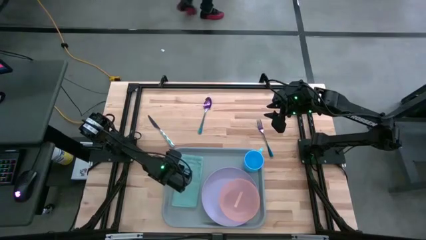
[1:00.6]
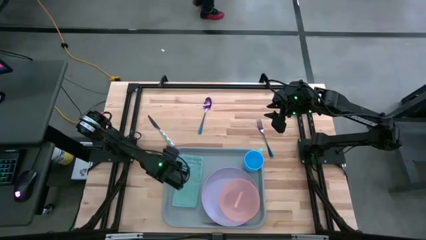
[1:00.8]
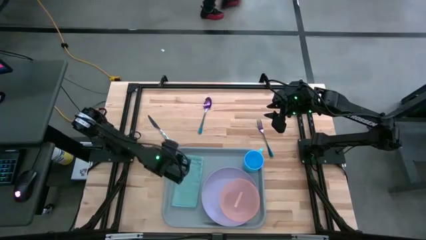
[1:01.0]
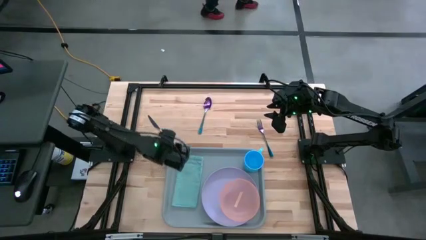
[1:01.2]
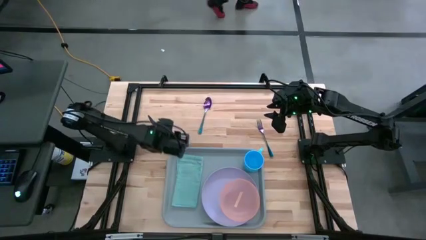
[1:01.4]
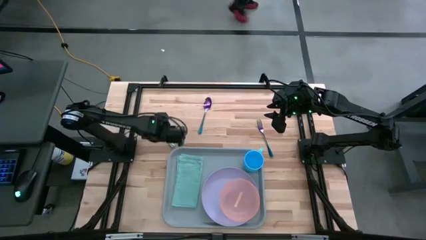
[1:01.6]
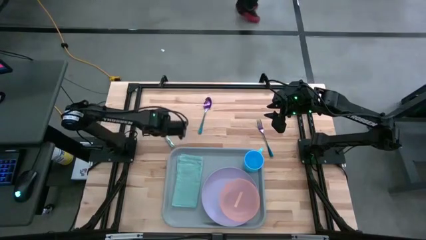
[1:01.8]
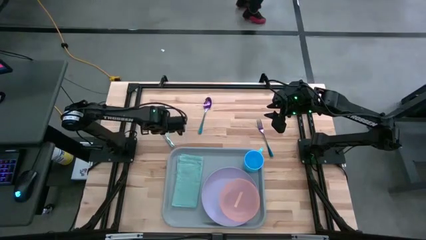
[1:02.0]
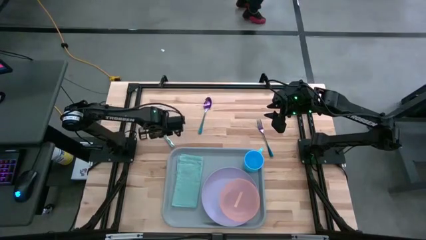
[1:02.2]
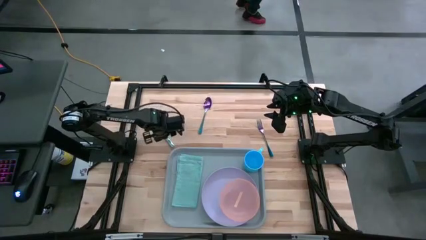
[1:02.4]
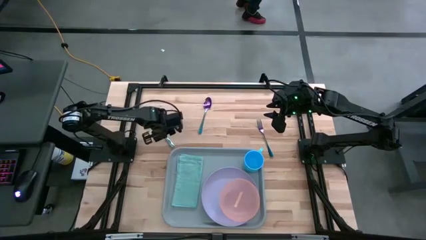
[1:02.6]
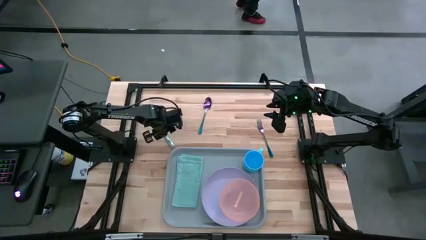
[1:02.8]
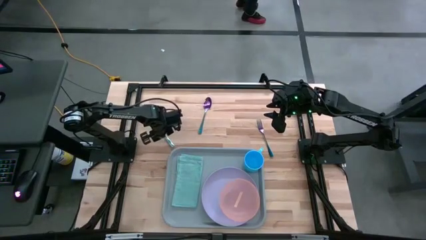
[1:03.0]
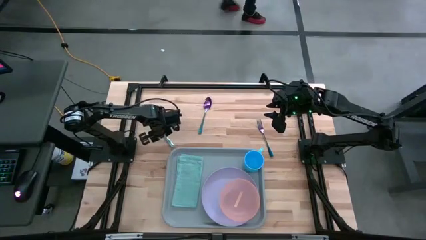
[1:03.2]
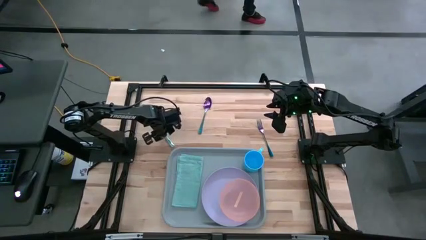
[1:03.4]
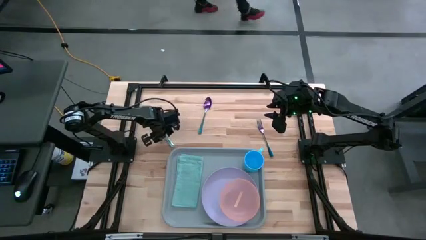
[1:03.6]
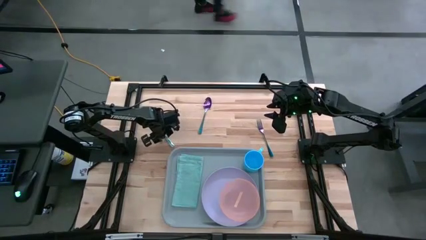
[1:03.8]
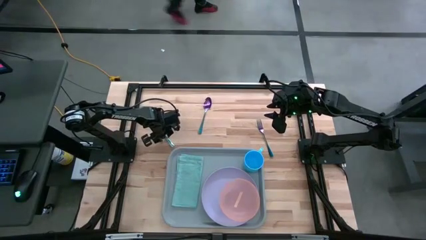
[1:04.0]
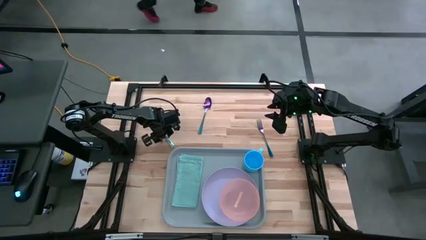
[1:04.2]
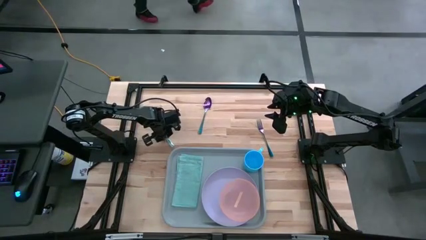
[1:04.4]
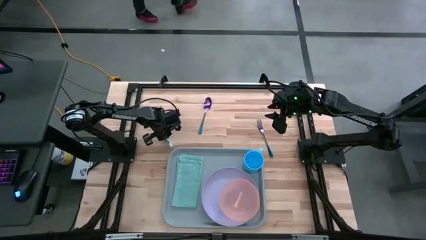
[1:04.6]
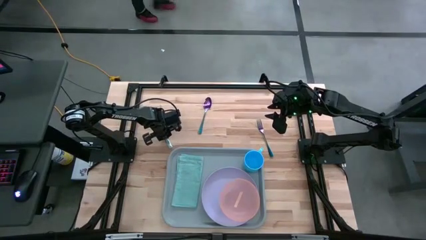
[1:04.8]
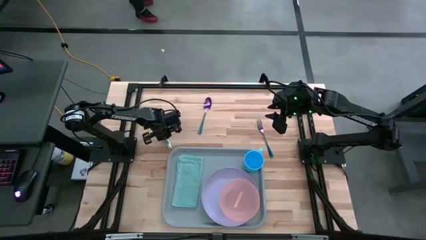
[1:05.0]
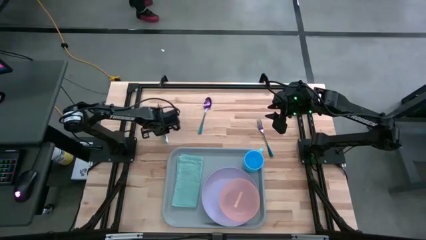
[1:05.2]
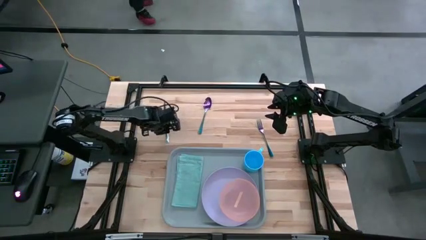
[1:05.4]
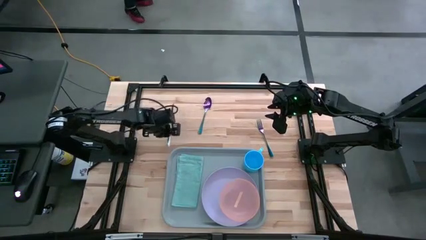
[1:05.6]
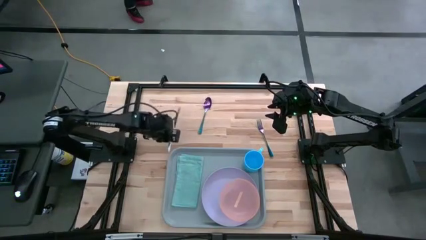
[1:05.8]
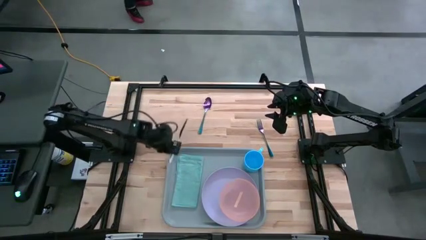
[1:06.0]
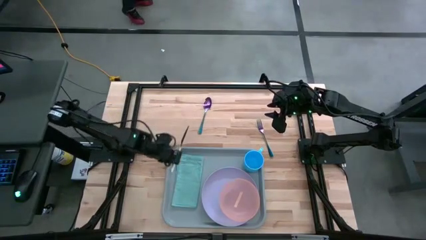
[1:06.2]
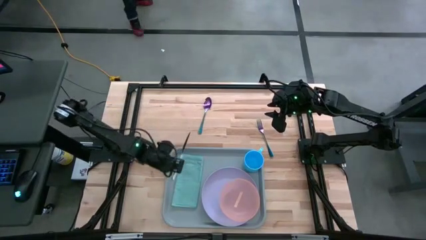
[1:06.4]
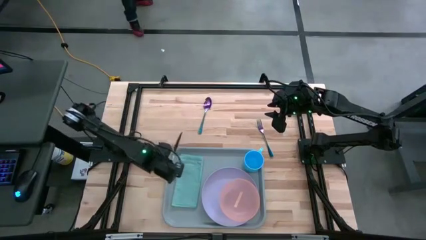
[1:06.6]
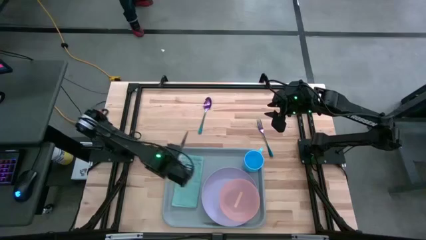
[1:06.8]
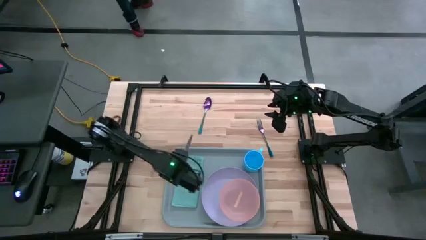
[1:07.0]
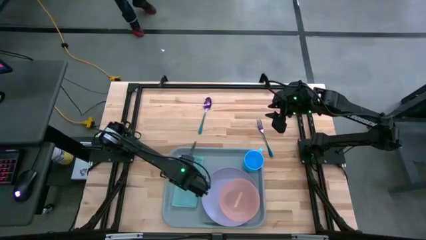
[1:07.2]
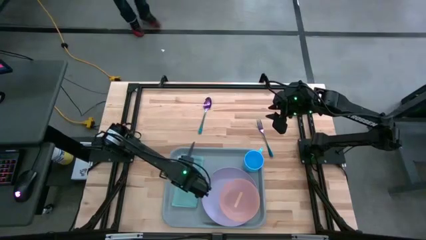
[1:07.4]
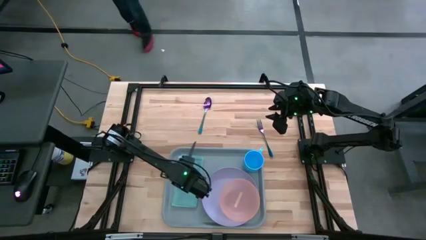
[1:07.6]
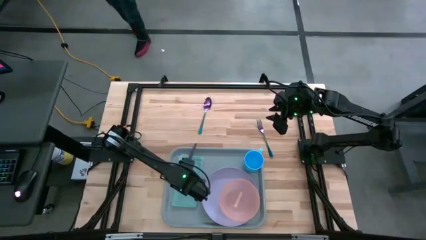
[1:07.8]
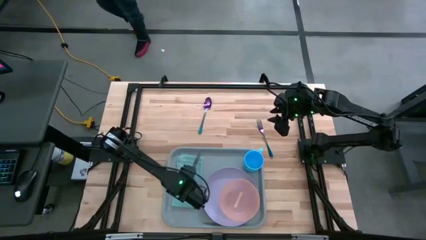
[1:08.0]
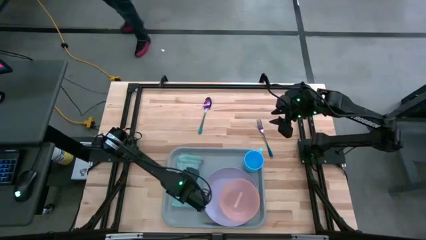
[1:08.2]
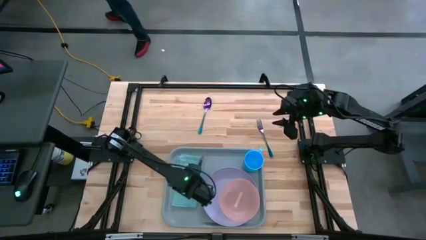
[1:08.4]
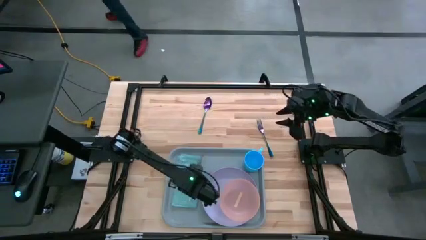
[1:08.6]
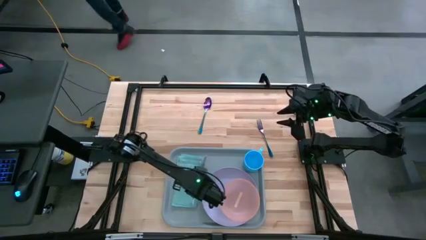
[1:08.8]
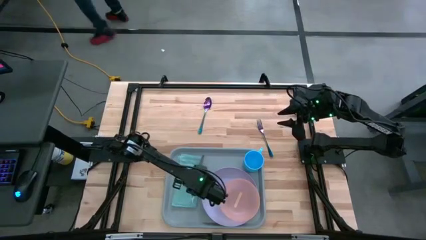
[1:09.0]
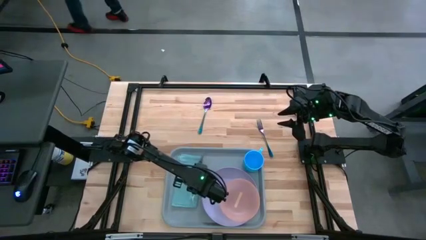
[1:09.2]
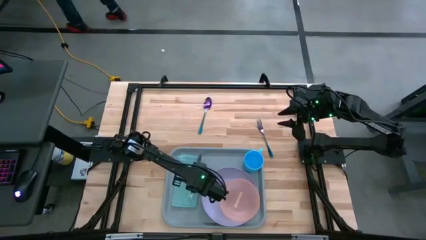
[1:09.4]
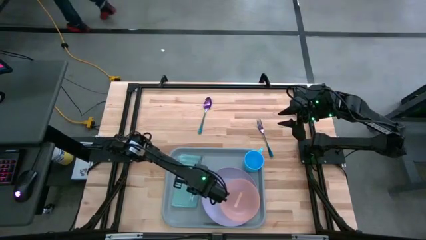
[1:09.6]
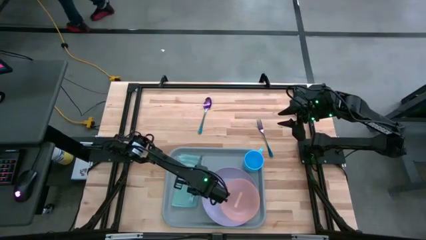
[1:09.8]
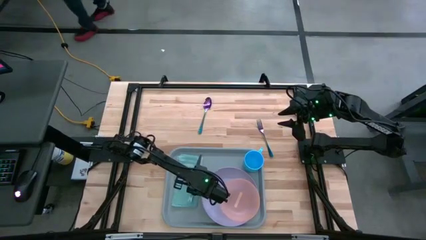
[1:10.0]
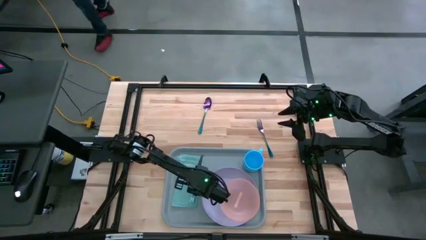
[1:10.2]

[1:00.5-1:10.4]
Task: Set up tray
Put the blue knife on top of the blue napkin to the left of the purple plate

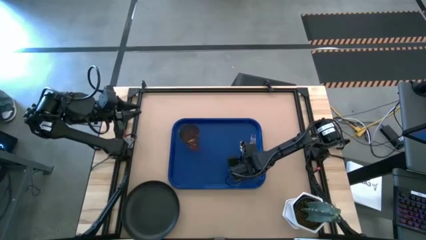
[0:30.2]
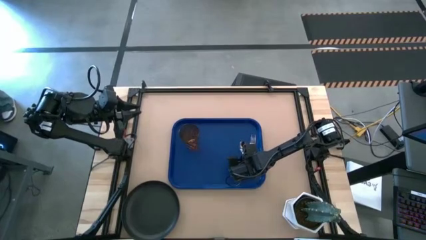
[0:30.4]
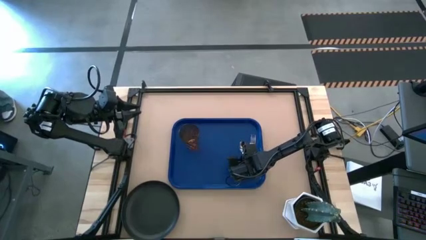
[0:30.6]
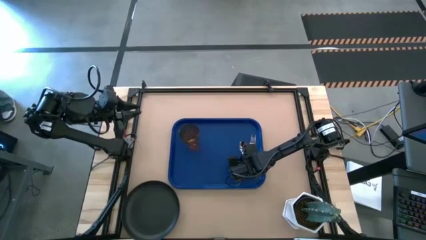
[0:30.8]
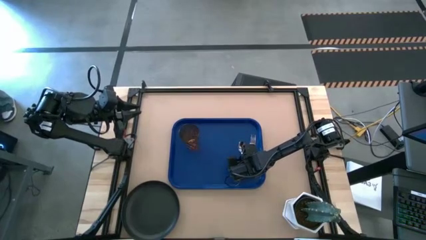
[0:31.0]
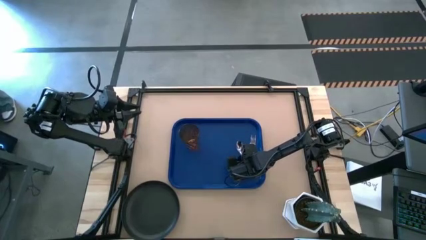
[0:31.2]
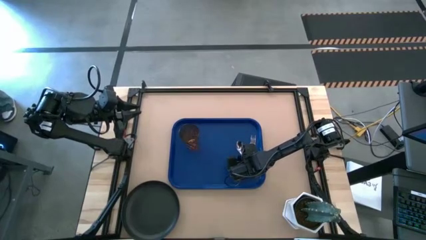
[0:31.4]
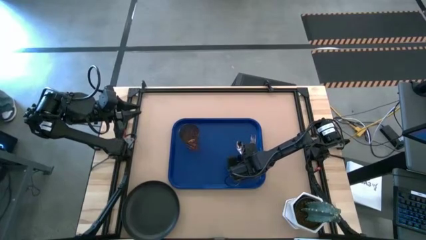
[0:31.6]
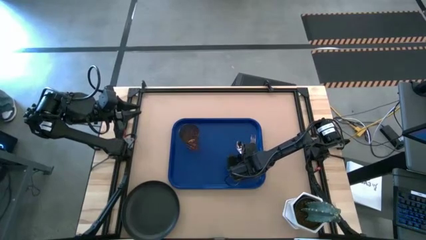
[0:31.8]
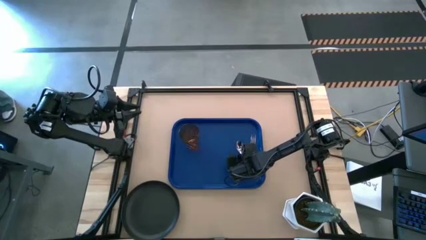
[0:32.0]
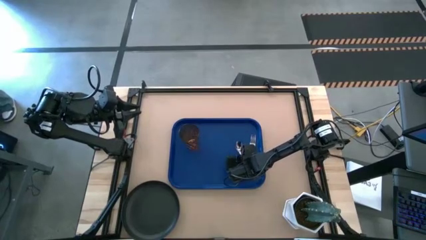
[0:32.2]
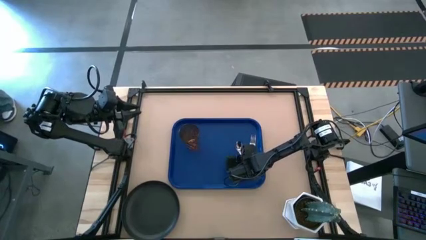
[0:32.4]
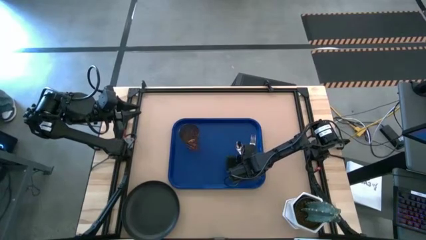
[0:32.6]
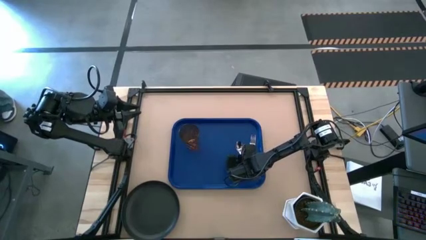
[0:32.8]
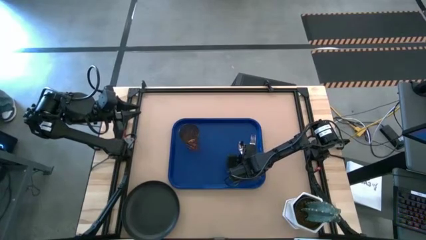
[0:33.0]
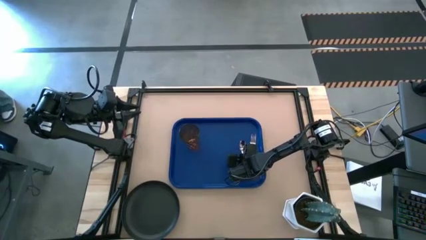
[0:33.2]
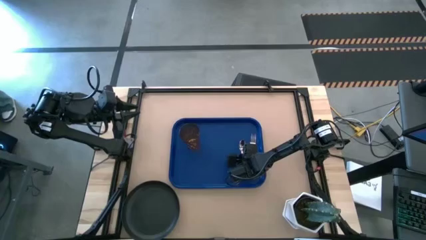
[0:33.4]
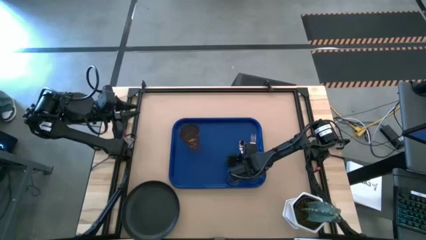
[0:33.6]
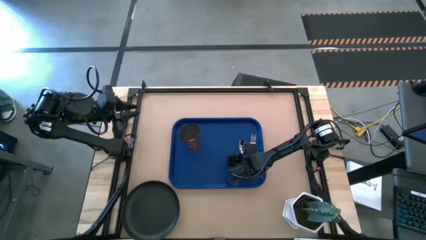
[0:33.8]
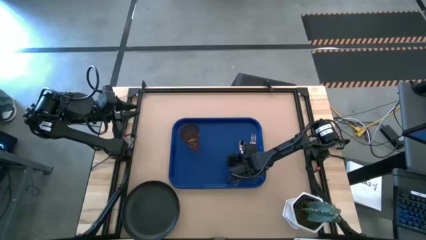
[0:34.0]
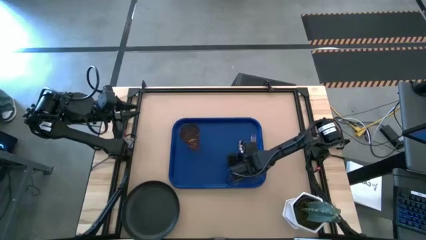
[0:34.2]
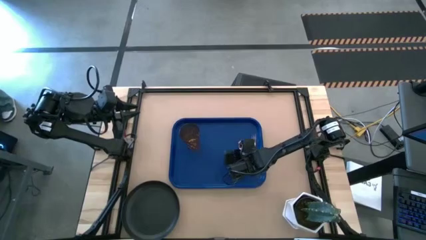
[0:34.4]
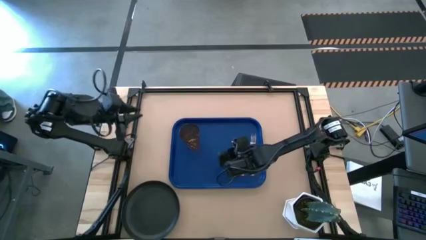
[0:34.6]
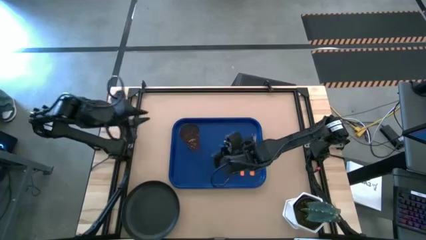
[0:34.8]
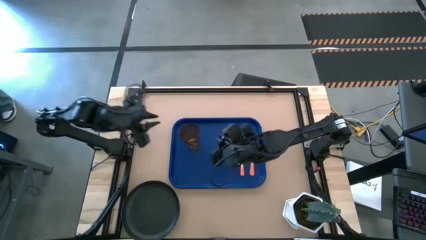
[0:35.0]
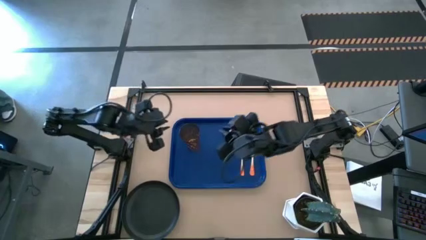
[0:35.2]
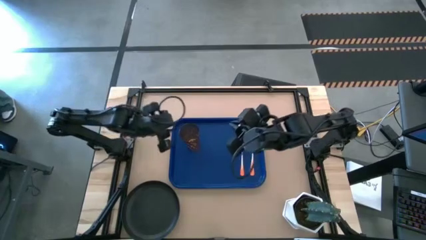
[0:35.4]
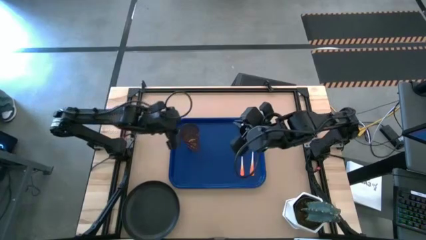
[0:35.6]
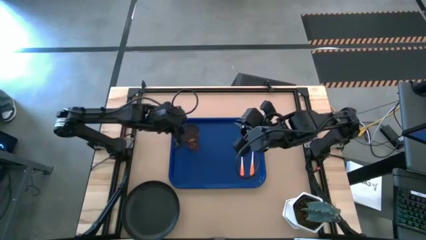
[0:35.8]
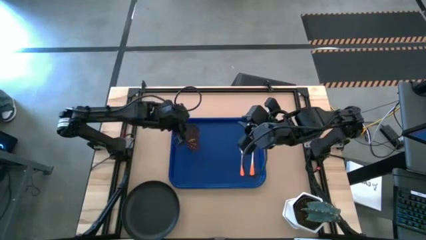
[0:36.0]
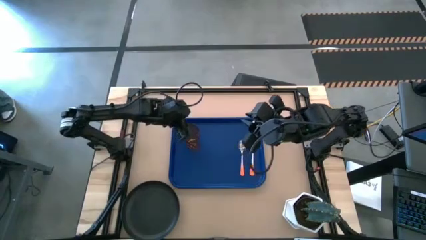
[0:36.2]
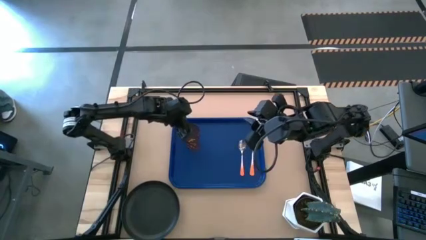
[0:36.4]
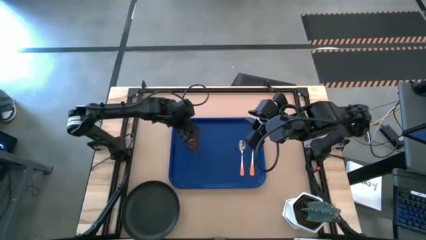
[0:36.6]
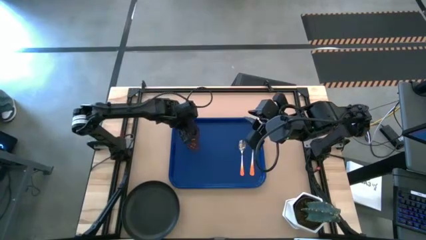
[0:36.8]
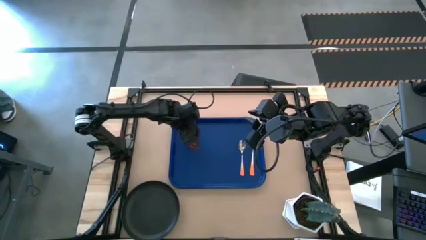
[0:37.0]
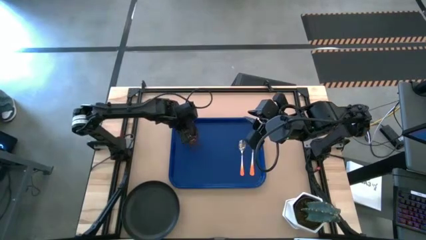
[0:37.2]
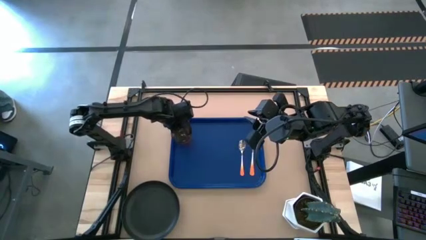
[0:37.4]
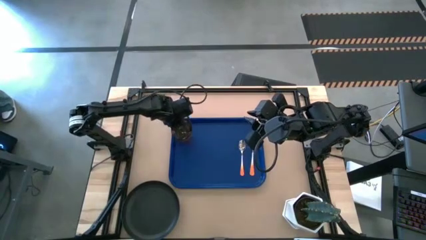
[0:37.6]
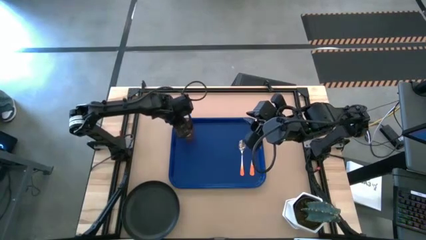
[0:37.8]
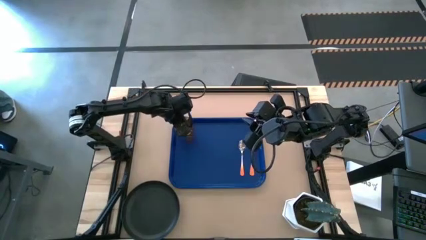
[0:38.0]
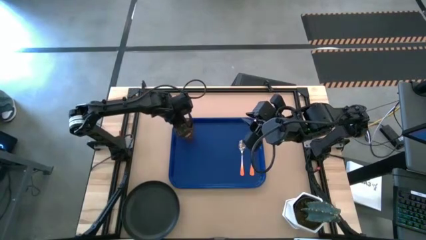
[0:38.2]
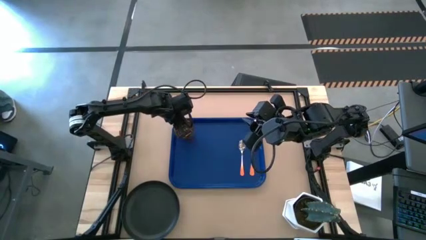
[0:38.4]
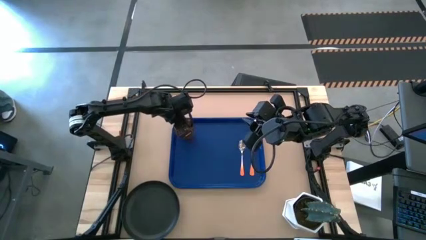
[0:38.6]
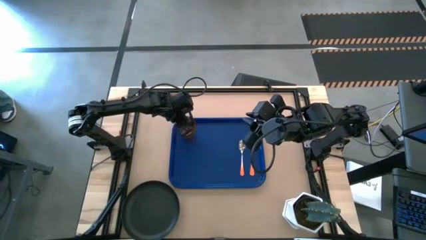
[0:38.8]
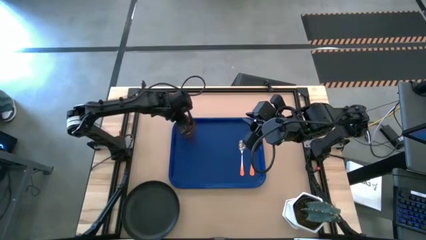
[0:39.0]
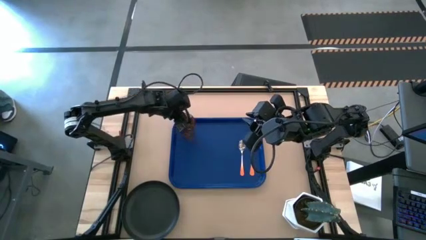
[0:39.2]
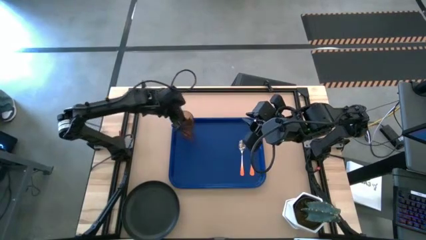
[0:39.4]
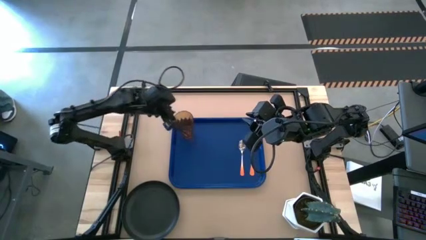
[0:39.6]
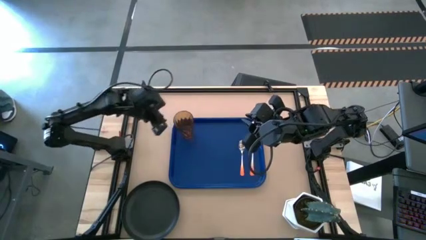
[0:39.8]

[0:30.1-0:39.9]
Task: Pick and place plate/cup/fork/spoon on tray
Put the spoon beside the fork on the blue tray
